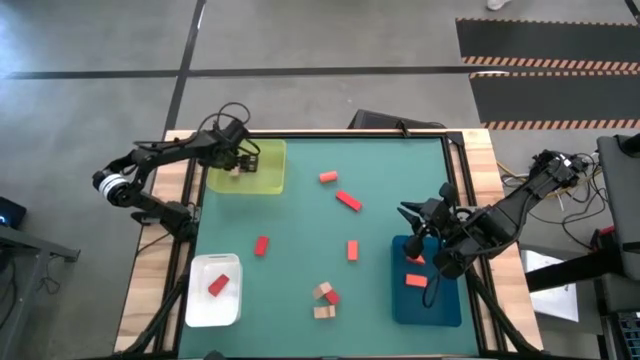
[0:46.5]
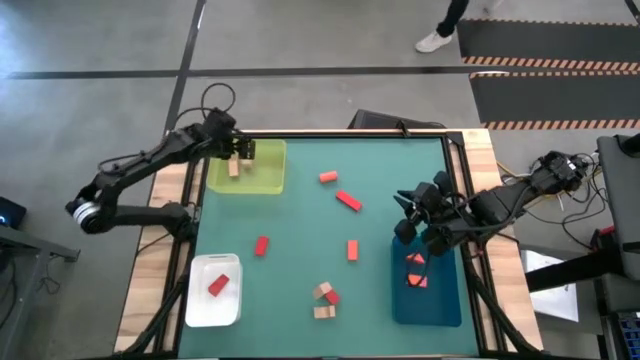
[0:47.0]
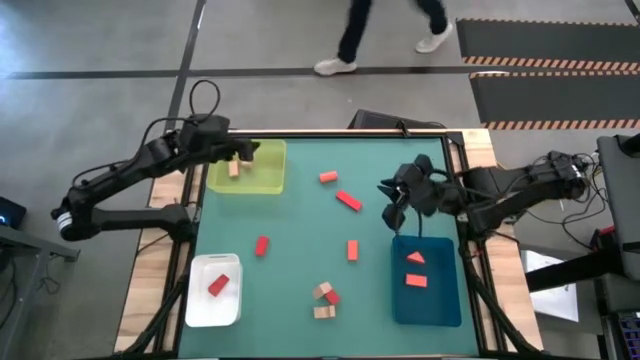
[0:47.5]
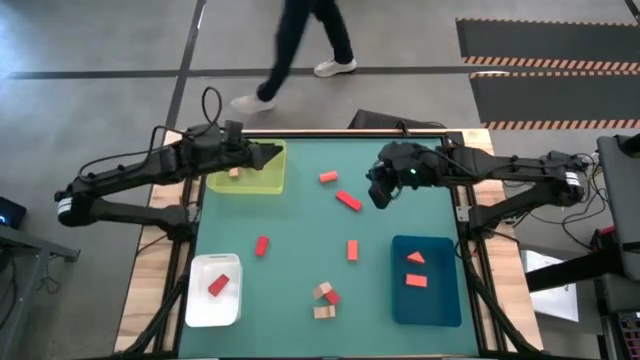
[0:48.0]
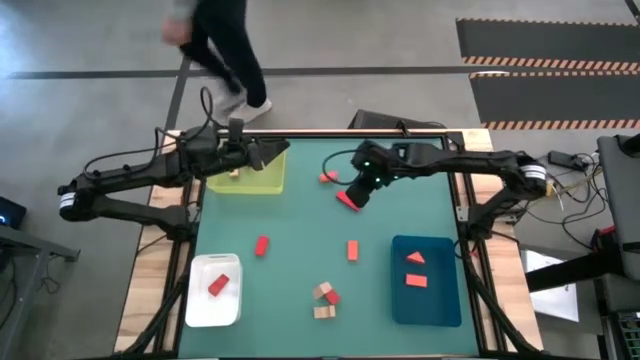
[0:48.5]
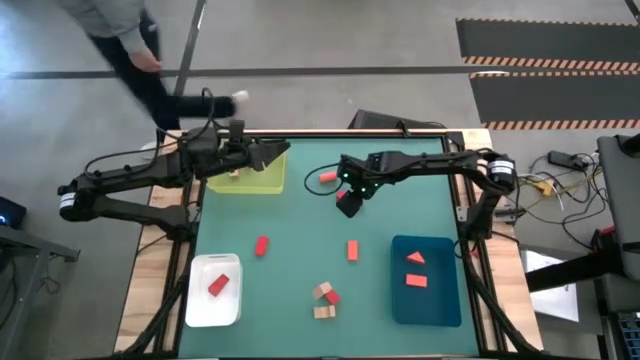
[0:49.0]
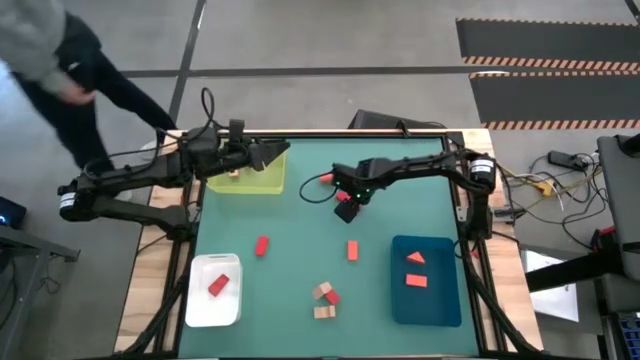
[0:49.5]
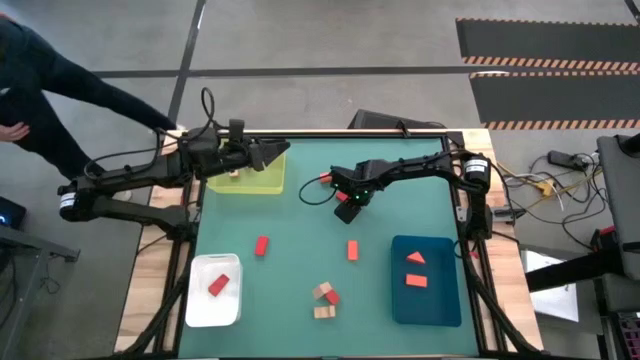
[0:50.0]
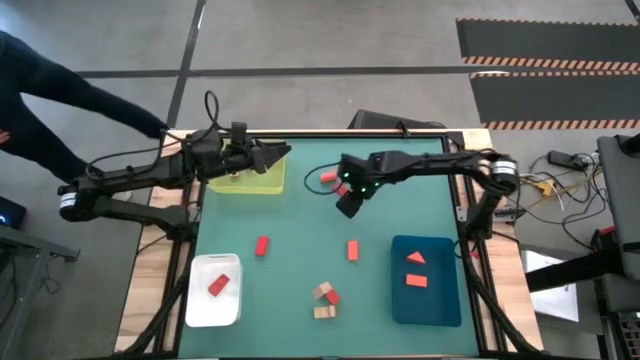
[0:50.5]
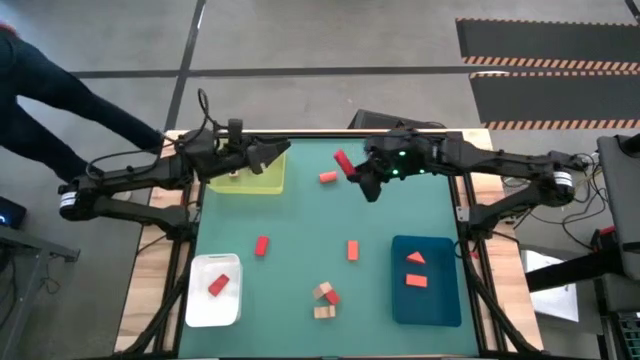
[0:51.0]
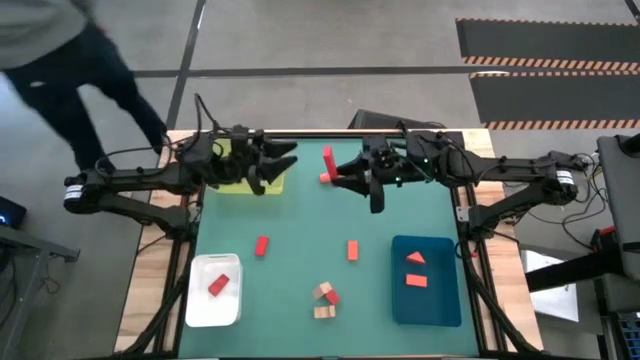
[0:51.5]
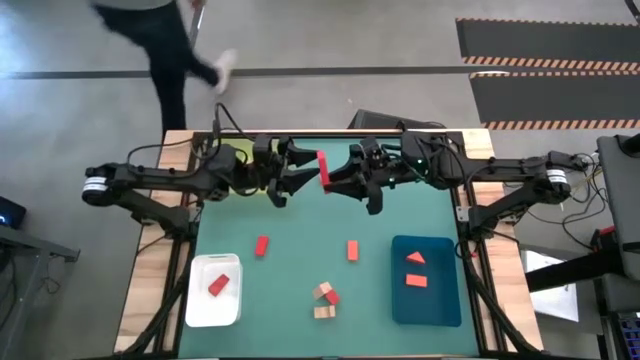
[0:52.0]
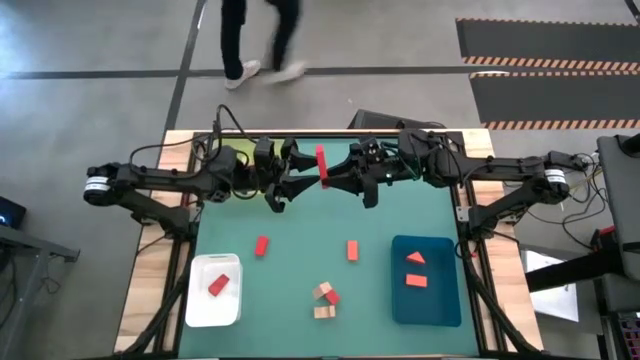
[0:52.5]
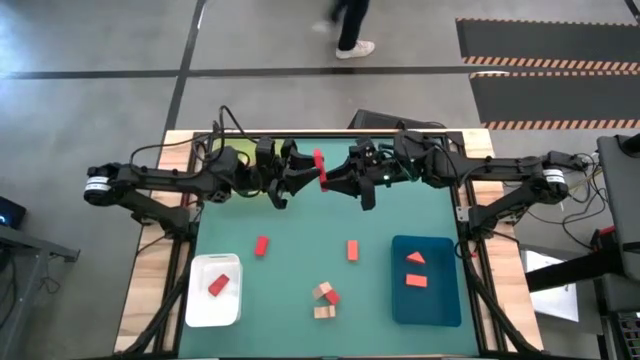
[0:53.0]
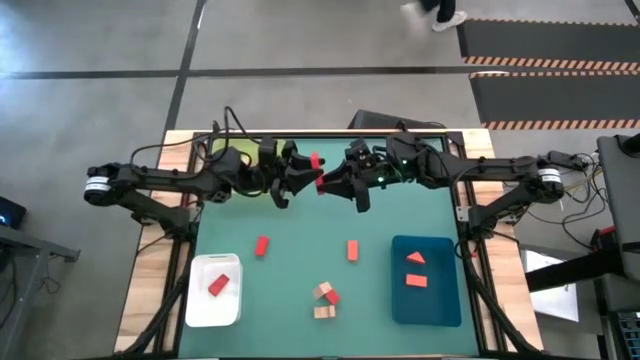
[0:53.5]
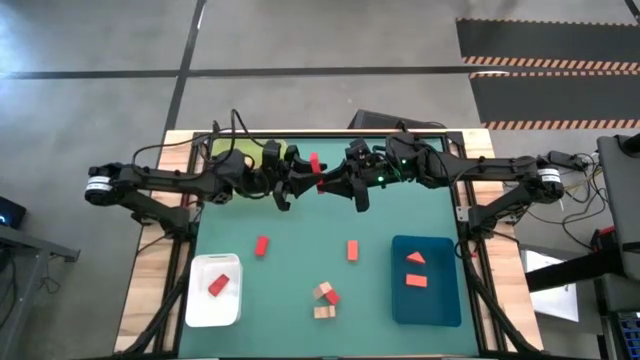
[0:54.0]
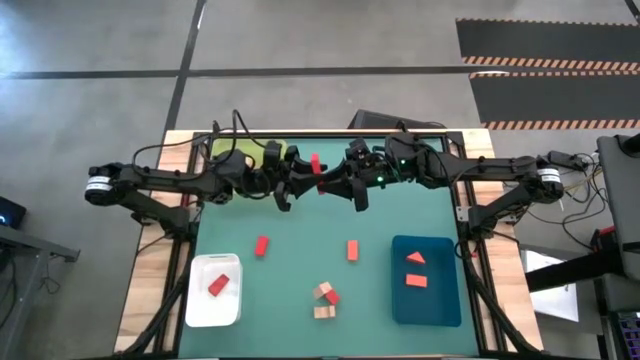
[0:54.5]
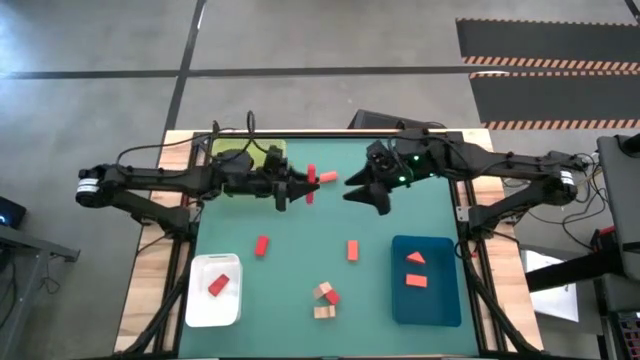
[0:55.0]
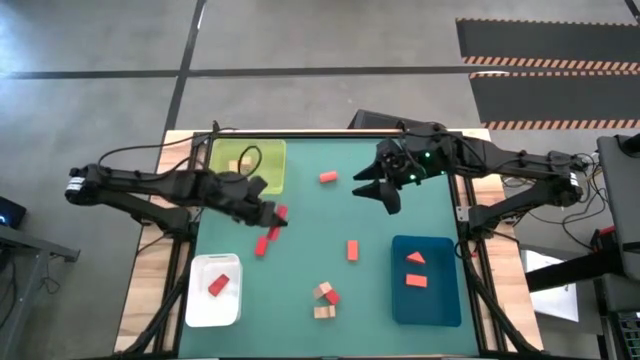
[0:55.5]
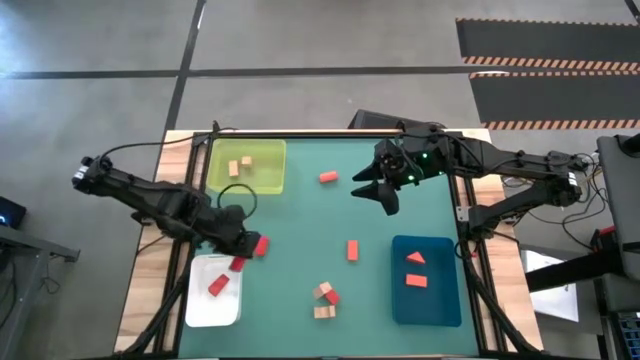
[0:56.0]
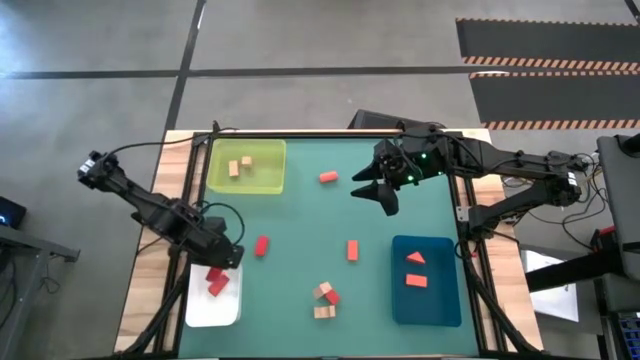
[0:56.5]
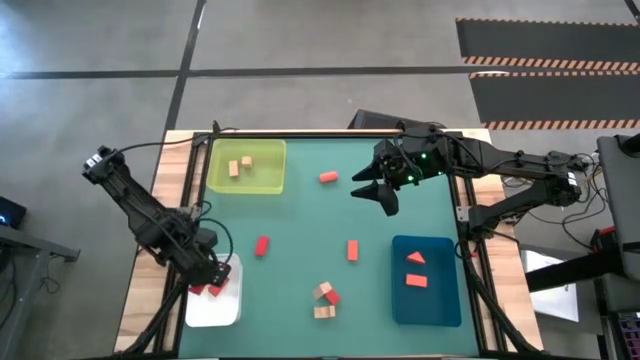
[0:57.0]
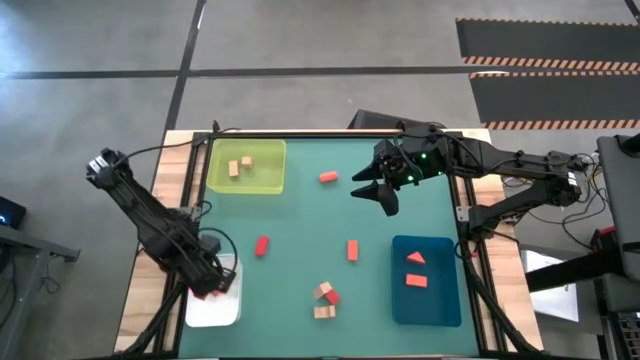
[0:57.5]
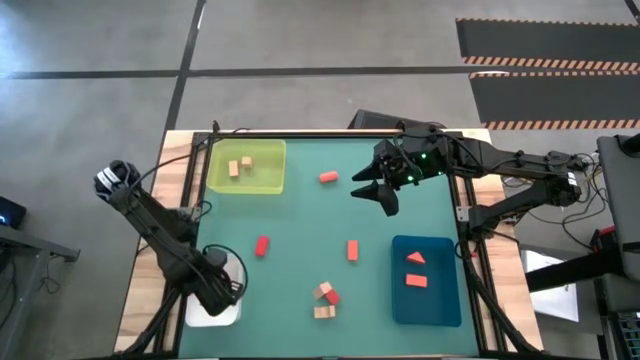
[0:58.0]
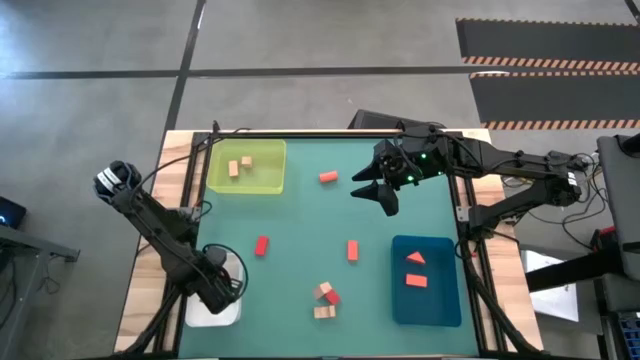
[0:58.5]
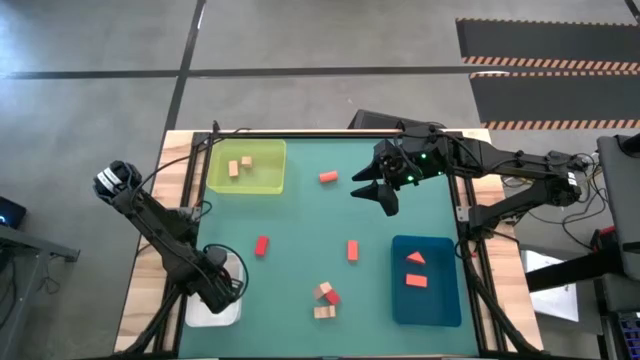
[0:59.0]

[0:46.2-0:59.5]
Task: Sort & place blocks by color
Put the red block into the white bin

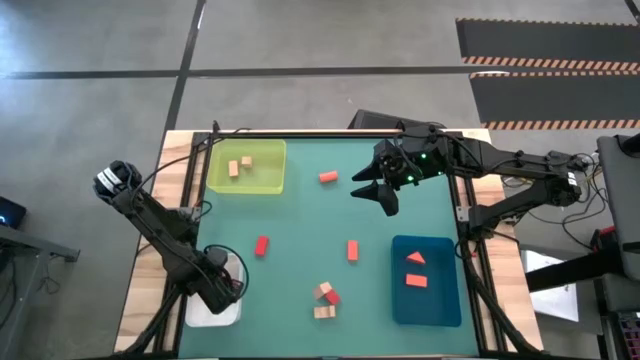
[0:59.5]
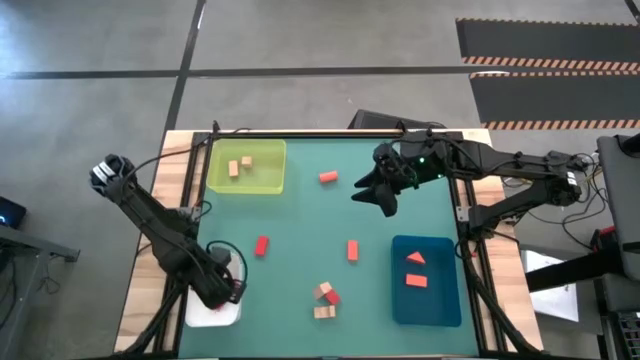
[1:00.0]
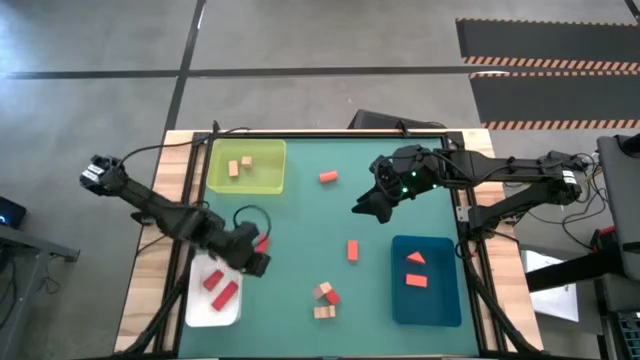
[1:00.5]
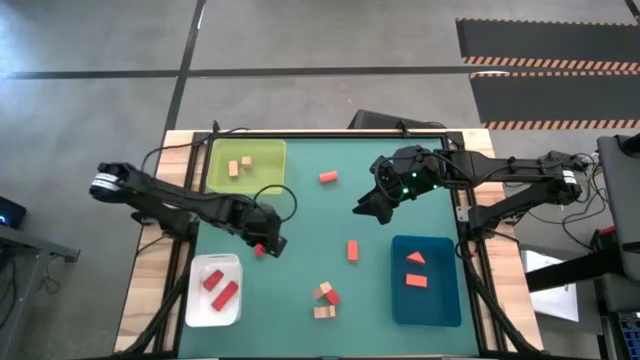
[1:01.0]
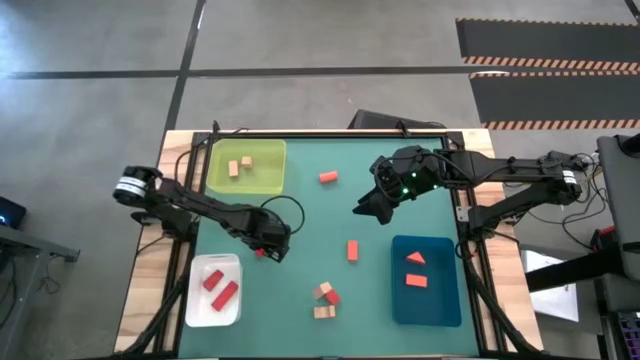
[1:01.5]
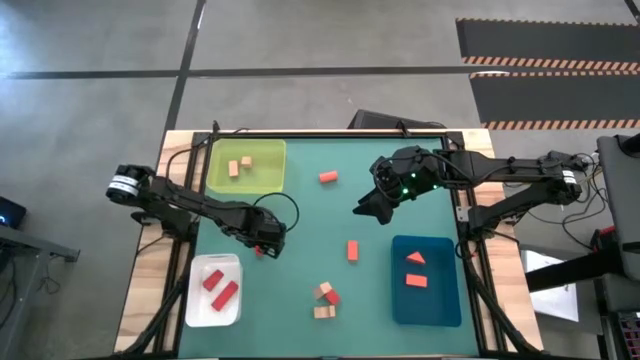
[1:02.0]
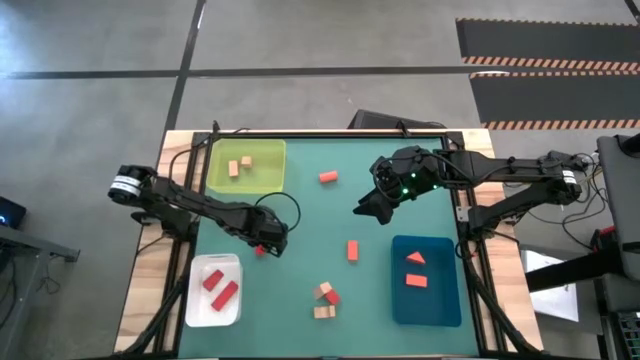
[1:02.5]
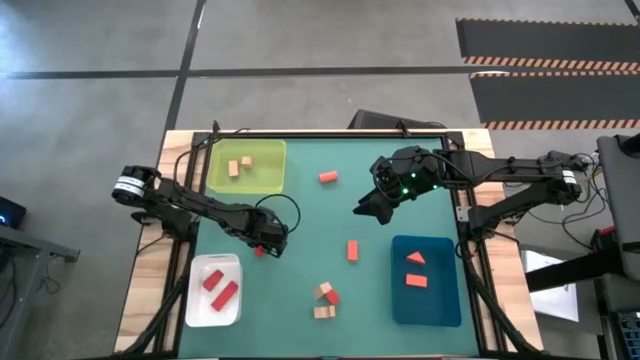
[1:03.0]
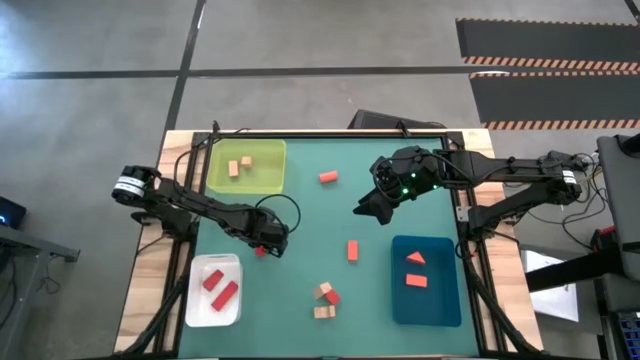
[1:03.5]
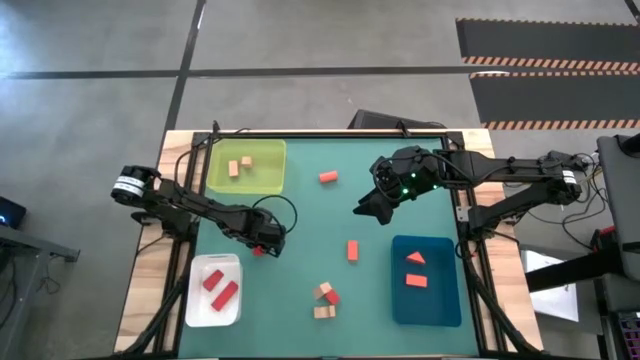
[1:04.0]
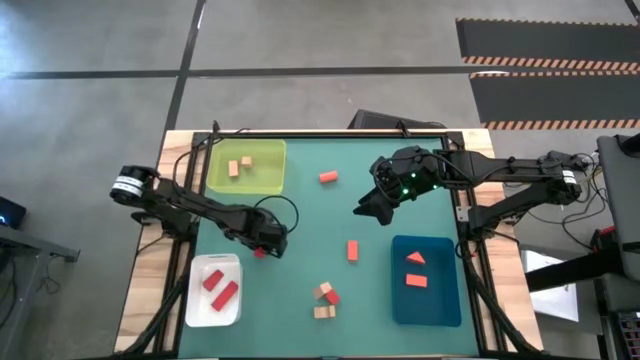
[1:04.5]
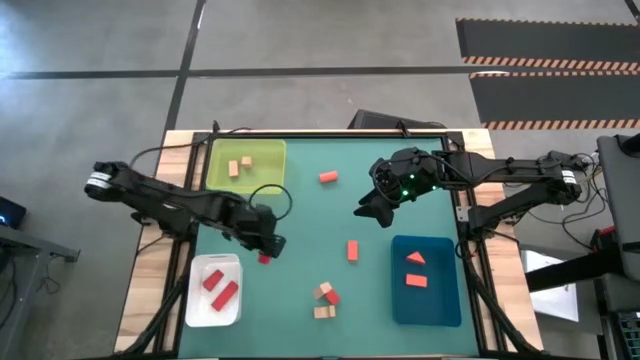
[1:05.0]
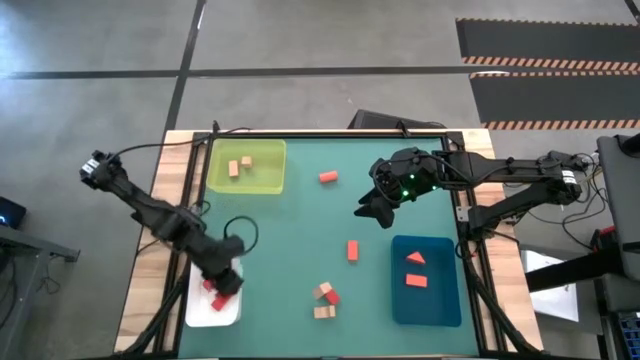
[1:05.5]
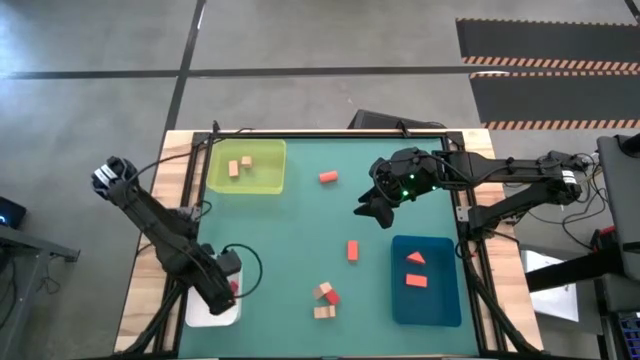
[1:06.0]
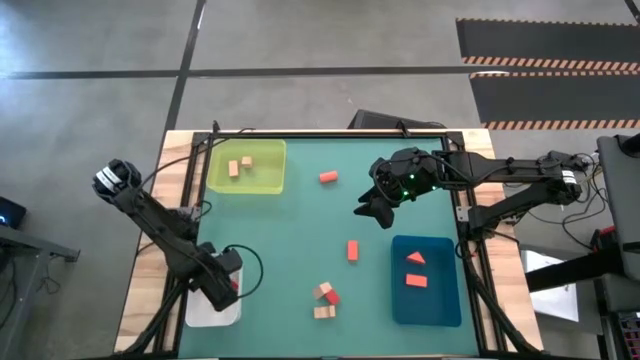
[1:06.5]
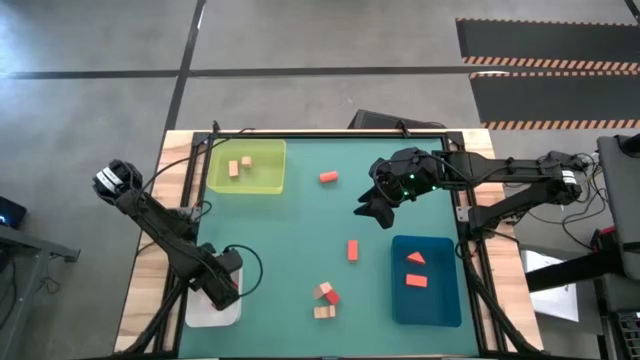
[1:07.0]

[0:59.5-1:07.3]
Put the red block into the white bin

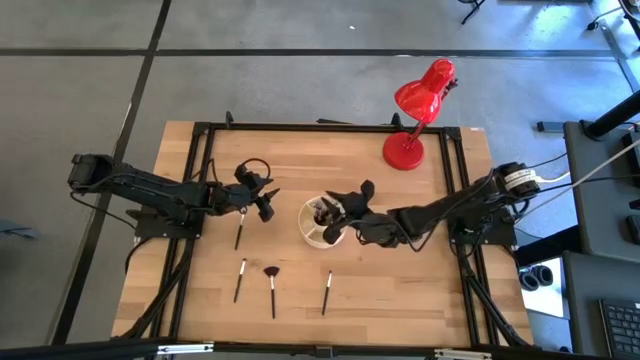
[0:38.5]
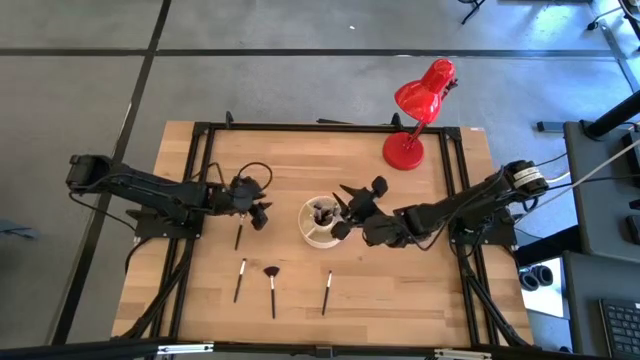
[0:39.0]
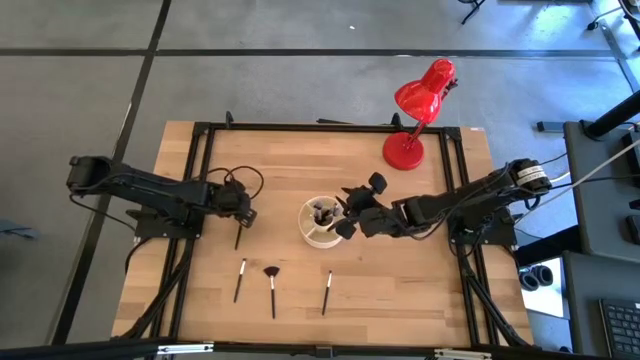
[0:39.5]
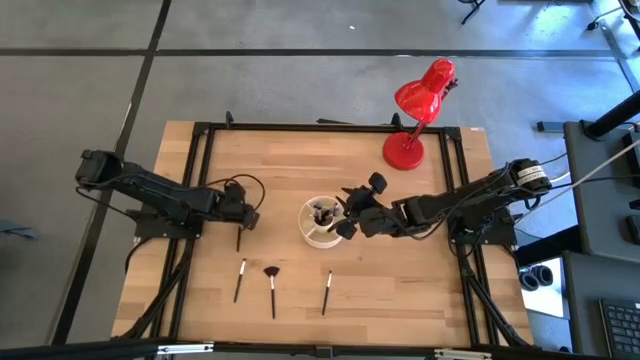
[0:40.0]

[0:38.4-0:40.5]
Task: Put items in baskets/containers
Put the black eyeshadow brush into the white brush holder
